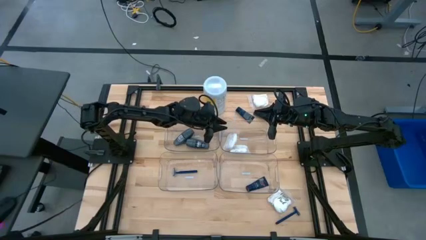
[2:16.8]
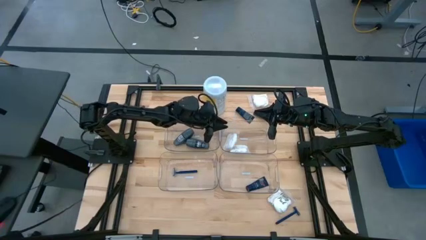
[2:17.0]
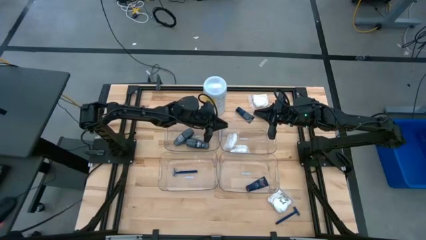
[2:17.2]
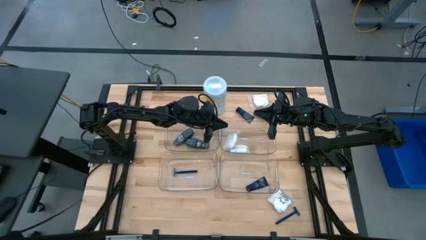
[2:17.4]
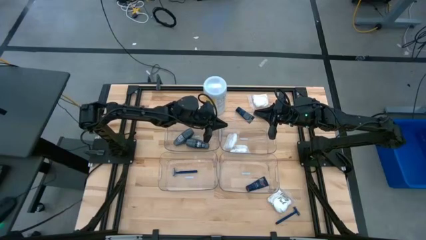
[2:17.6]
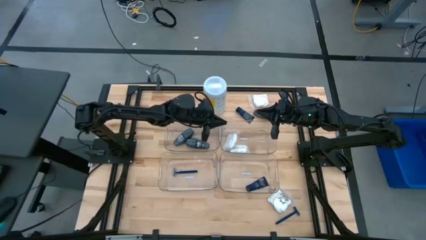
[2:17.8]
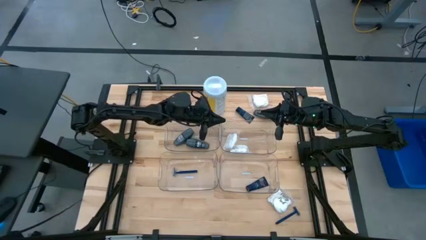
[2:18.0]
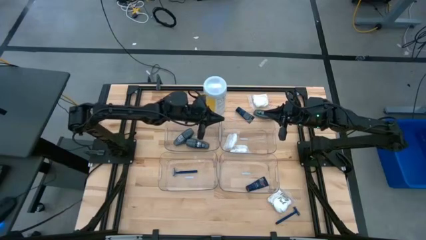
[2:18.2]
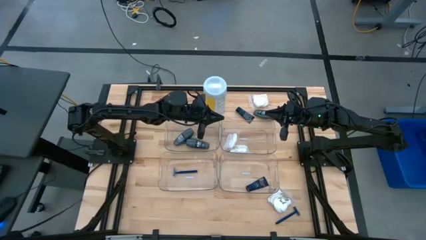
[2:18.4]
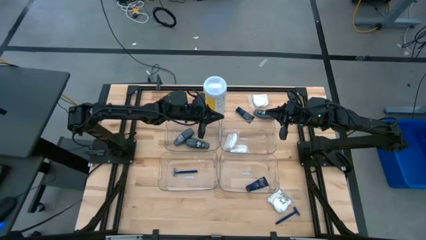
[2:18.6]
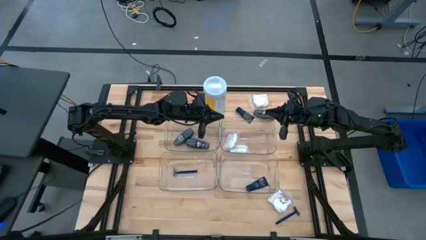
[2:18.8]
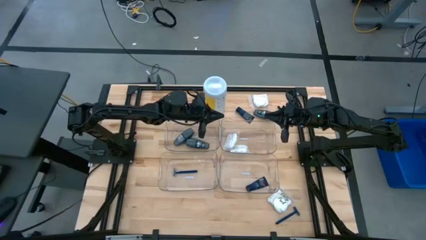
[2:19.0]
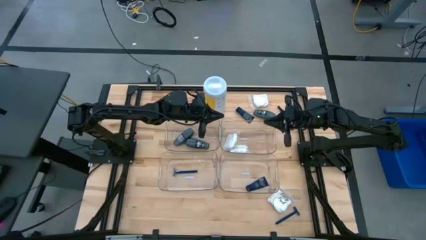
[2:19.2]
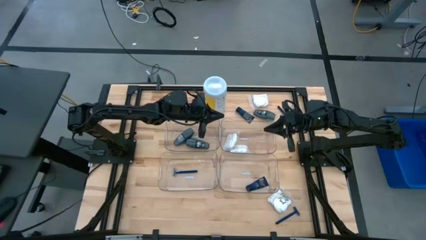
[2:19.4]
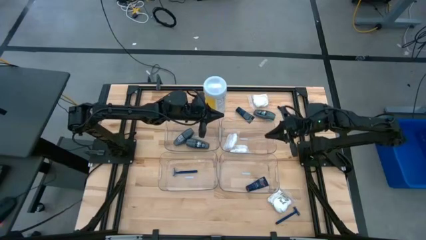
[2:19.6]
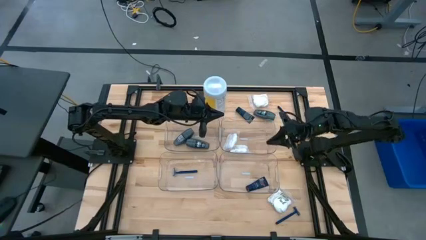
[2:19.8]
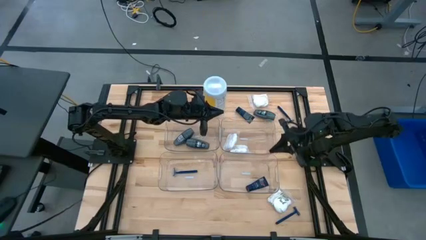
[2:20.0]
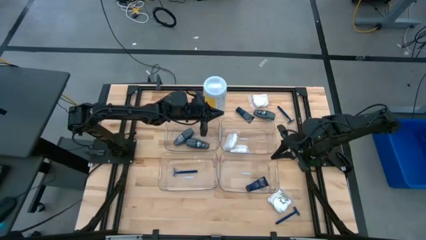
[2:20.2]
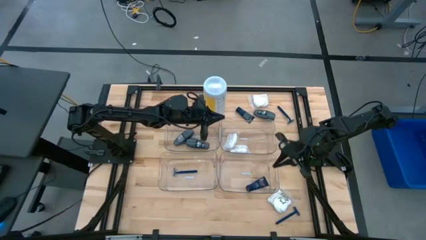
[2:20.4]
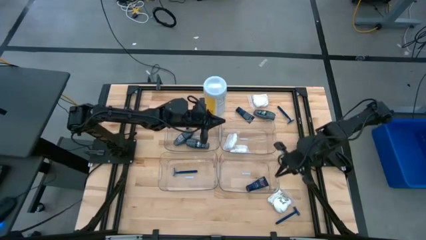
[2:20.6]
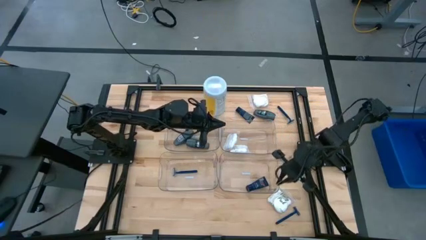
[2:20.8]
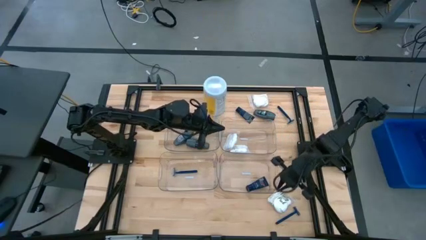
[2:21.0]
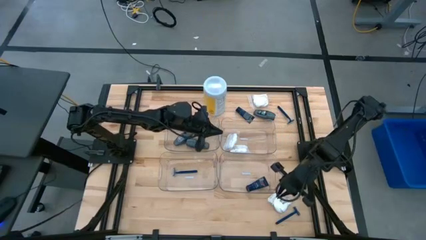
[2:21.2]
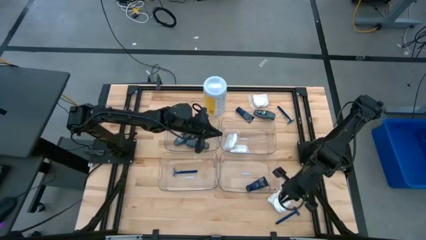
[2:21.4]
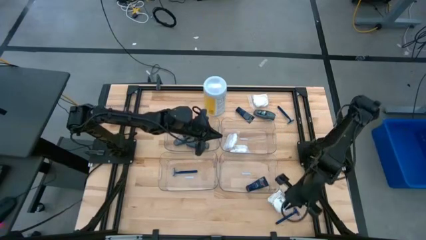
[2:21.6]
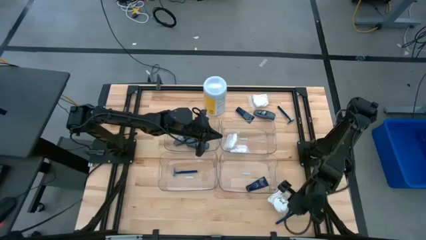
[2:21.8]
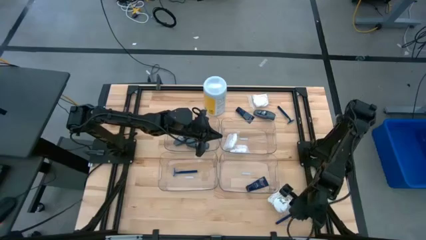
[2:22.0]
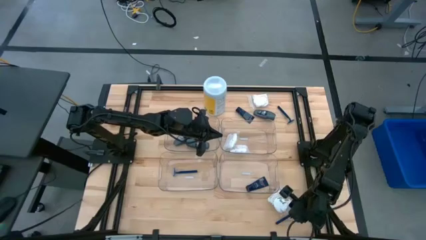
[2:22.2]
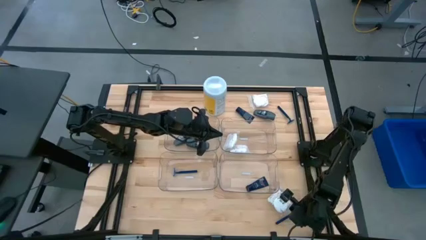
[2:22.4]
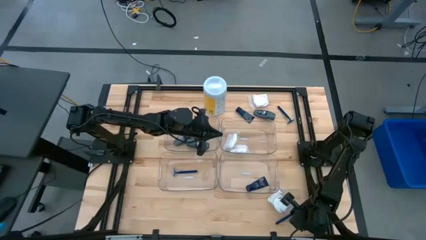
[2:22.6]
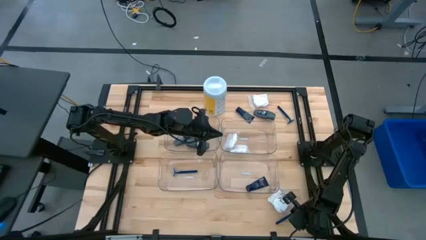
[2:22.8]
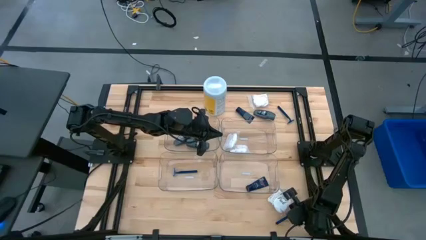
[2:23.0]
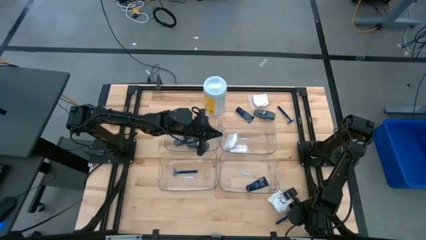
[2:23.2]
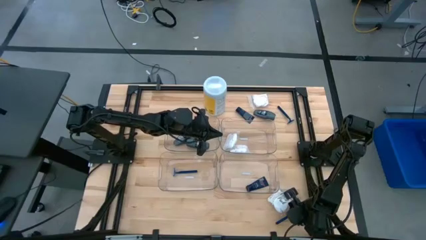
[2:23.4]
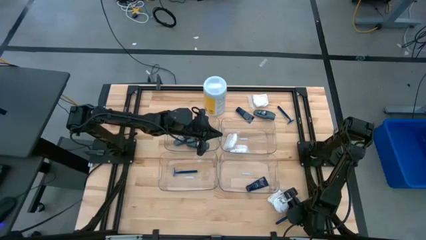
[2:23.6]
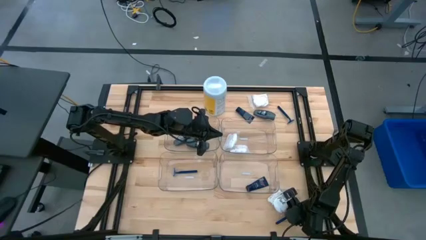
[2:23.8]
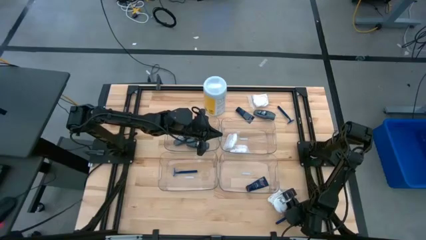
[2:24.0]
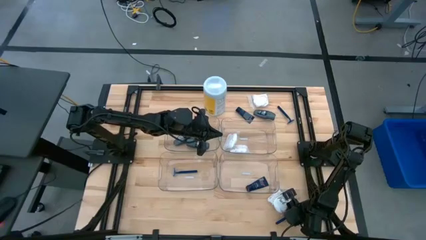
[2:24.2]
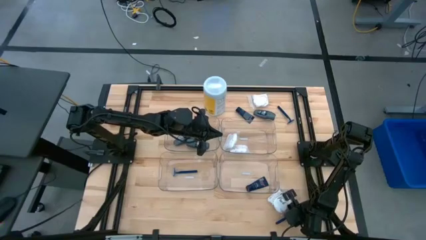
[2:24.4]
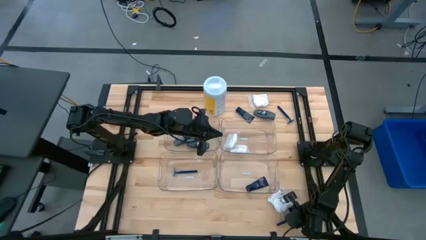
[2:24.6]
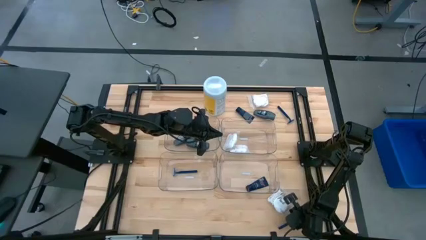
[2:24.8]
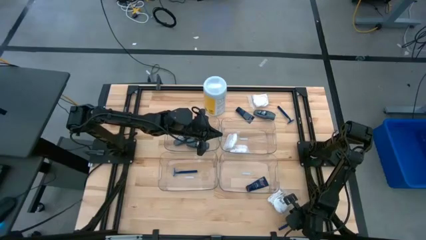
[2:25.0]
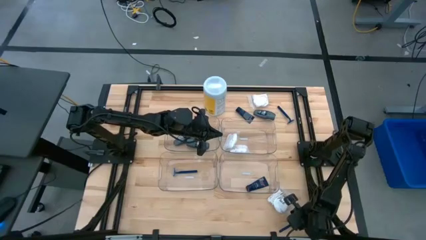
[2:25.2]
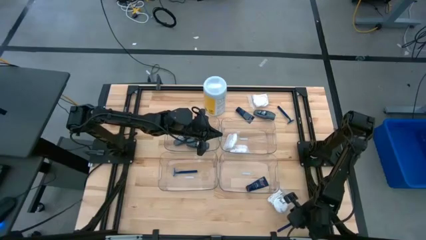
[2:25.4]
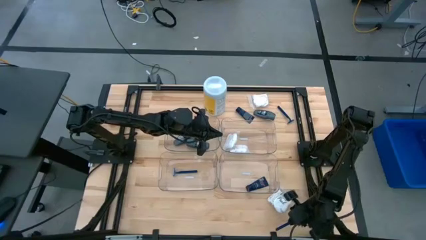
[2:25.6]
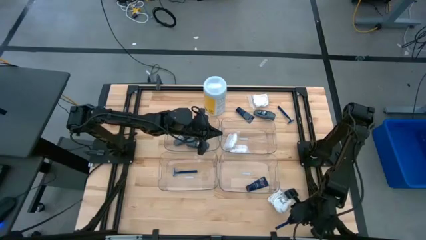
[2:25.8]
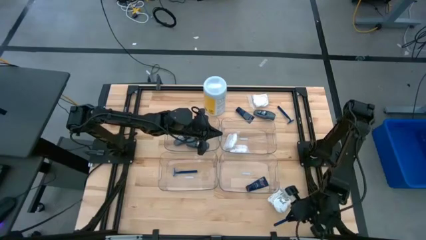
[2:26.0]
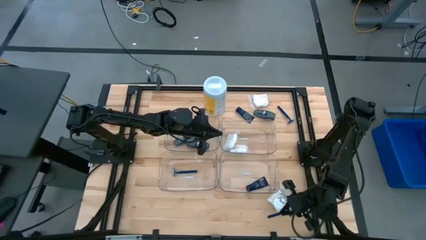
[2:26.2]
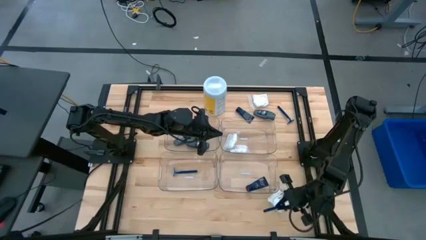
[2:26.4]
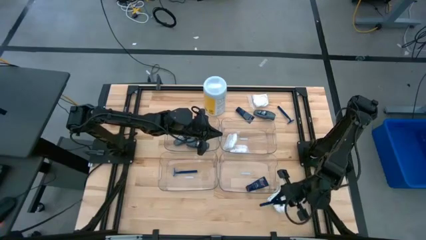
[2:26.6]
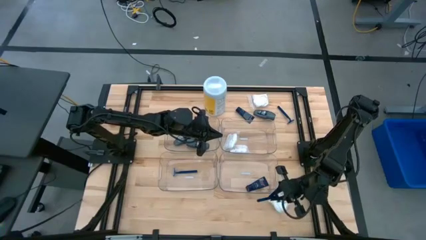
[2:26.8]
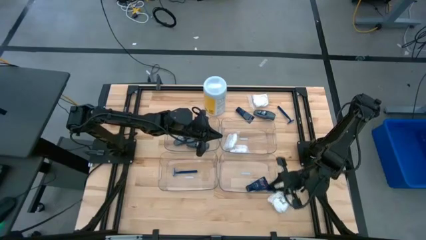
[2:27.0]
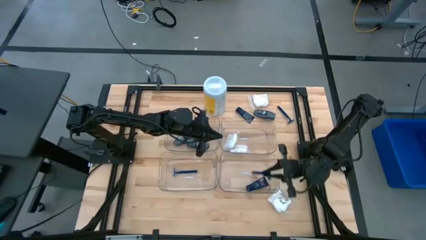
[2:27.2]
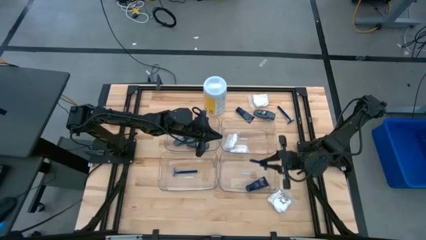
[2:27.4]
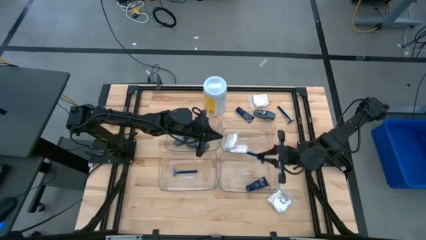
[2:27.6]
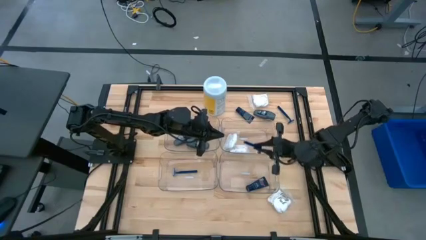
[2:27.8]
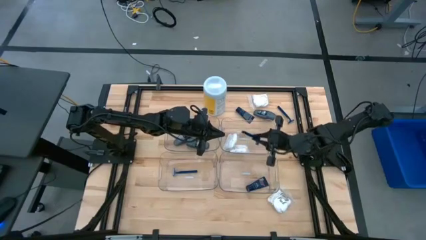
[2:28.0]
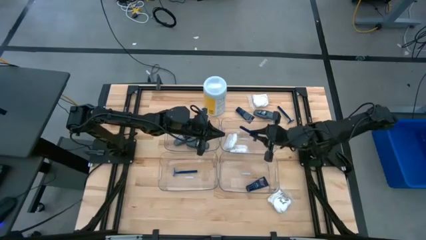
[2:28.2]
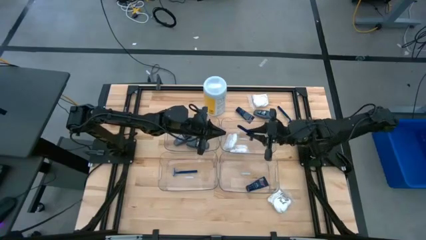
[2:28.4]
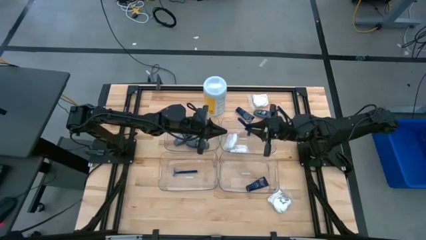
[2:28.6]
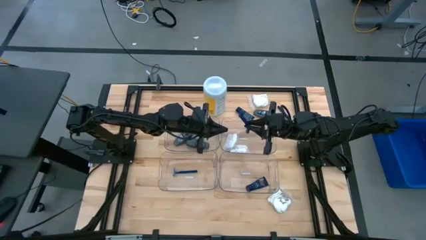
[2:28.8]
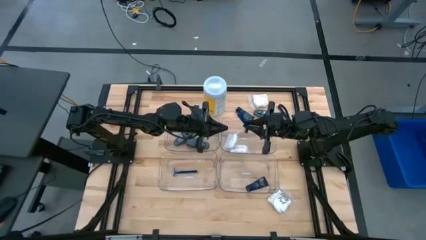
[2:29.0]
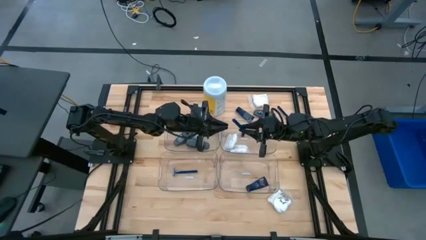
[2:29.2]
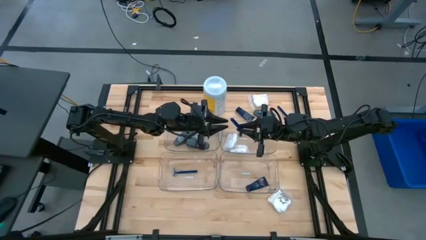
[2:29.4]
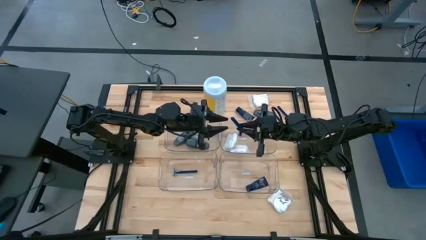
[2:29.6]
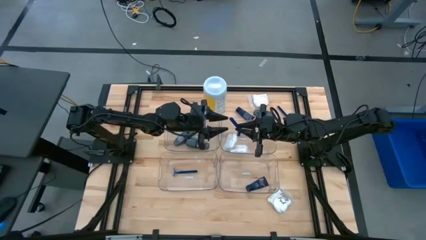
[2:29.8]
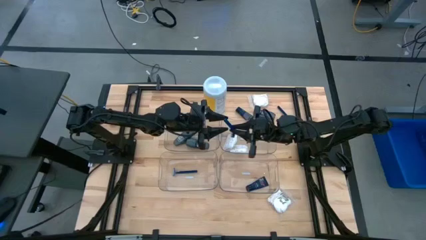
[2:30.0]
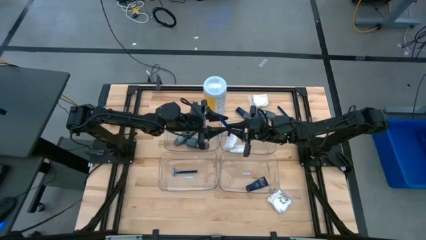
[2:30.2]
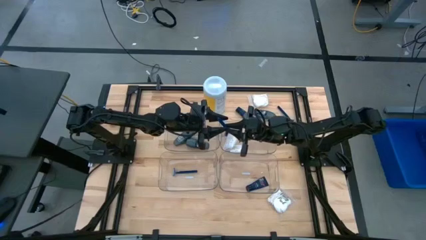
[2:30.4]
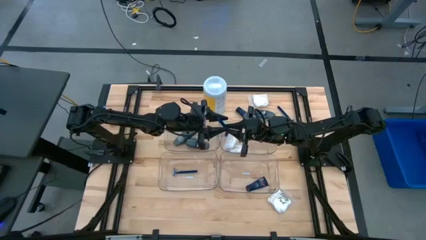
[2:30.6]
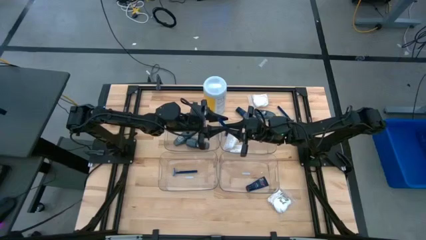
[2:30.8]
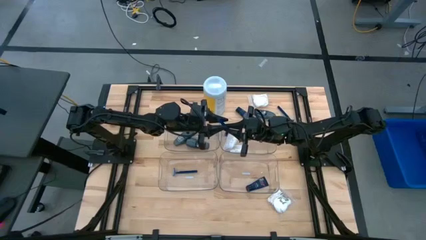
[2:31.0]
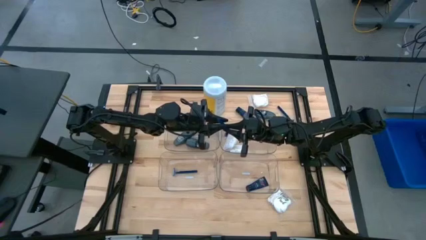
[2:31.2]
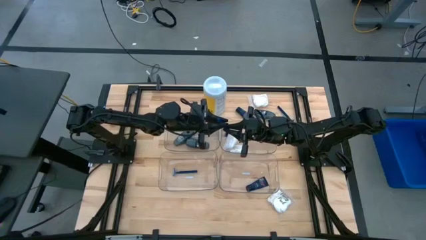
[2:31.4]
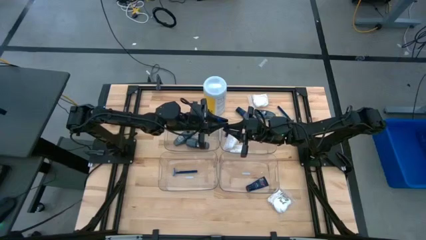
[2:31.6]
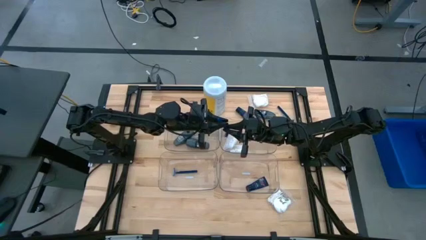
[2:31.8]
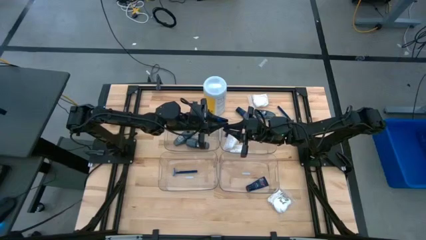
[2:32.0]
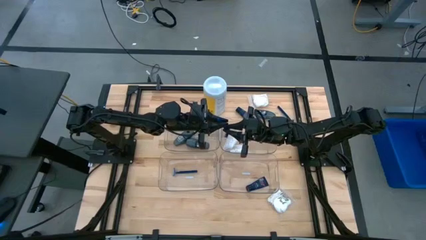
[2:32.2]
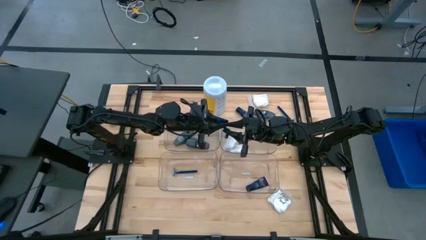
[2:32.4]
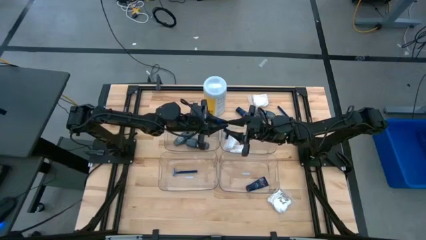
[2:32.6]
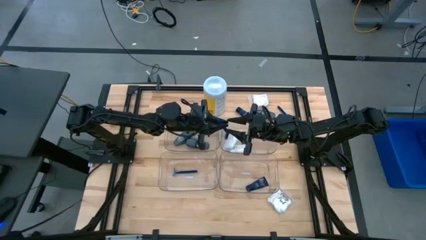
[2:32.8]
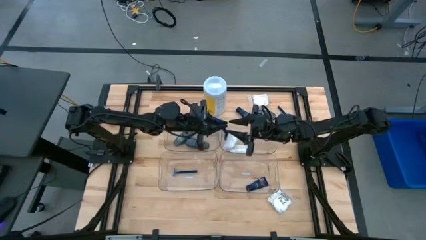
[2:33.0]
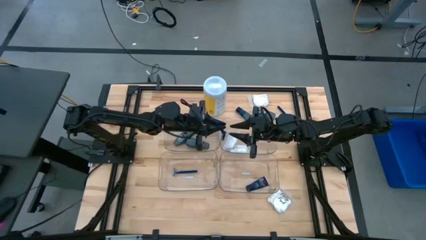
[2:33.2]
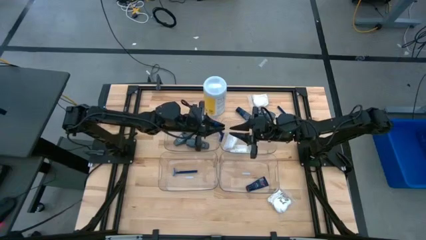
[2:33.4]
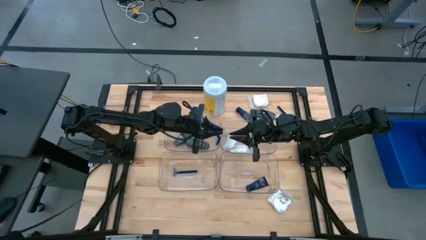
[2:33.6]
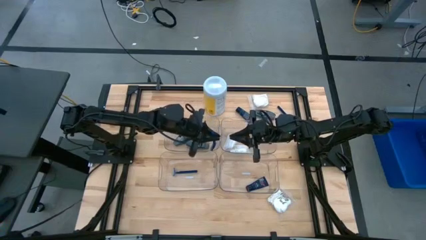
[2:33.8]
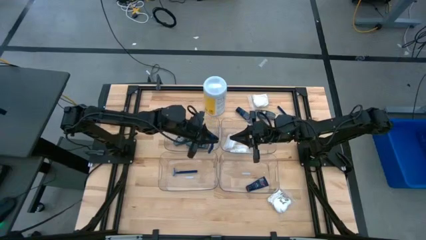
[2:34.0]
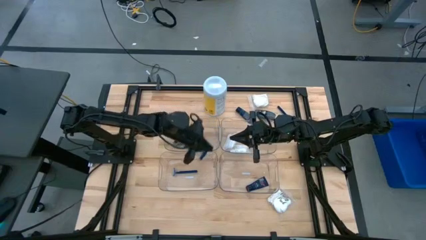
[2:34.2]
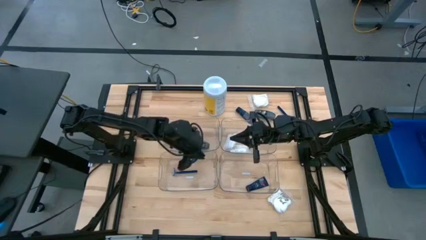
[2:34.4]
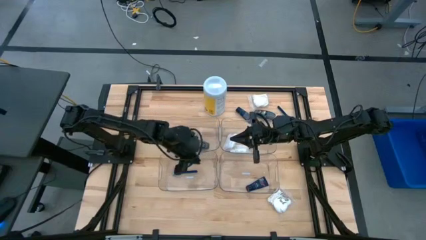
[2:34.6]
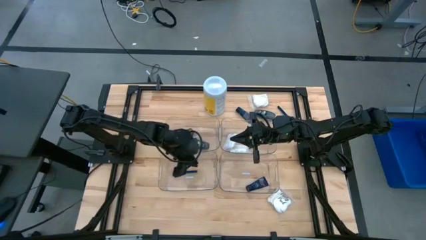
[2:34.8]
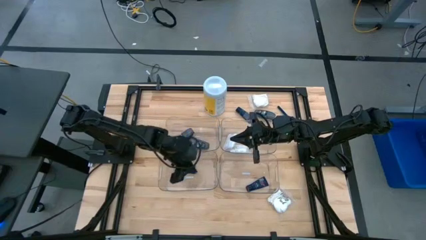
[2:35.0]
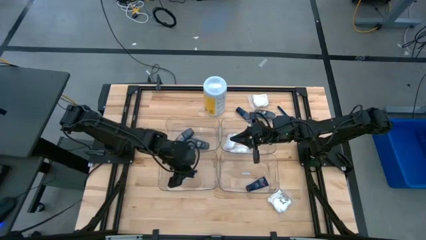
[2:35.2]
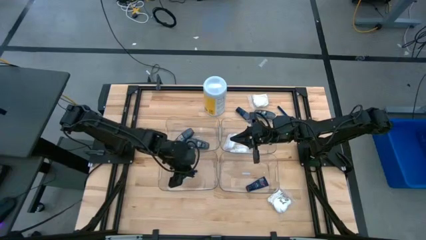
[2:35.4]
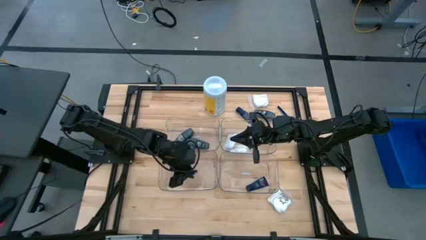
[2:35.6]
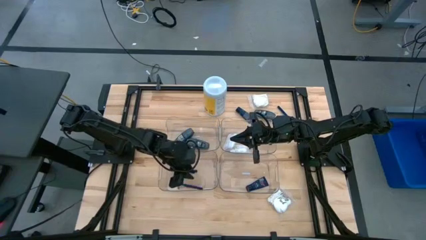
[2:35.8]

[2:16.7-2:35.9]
Task: Pick & Place Travel size toiletries
Put the bottom blue shaver into the bottom left transparent bin
